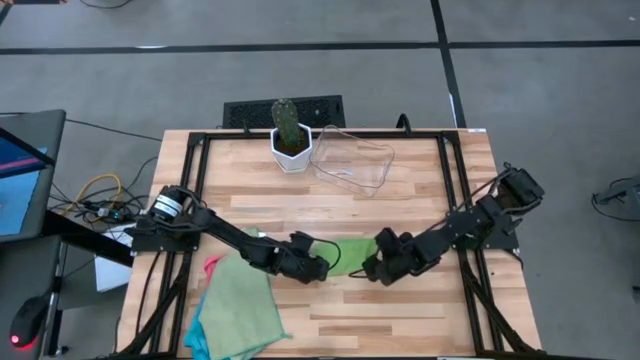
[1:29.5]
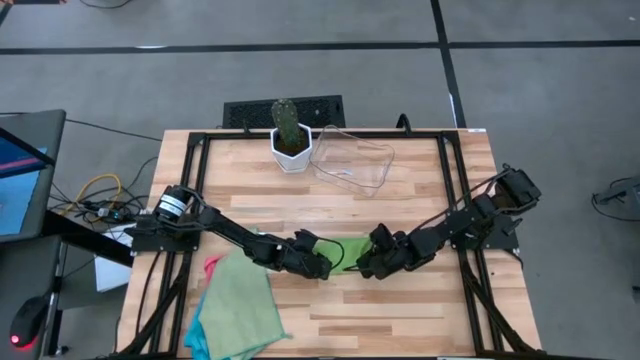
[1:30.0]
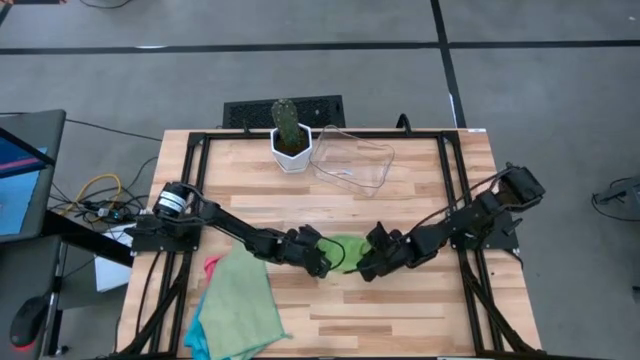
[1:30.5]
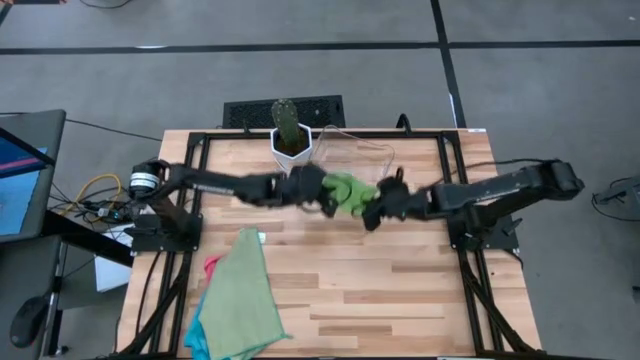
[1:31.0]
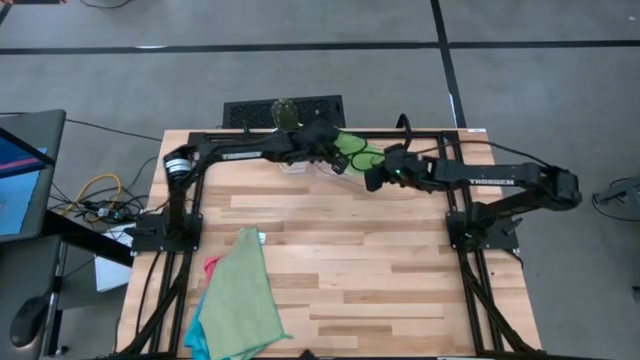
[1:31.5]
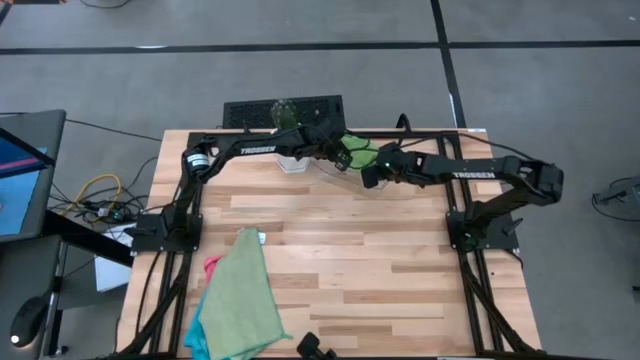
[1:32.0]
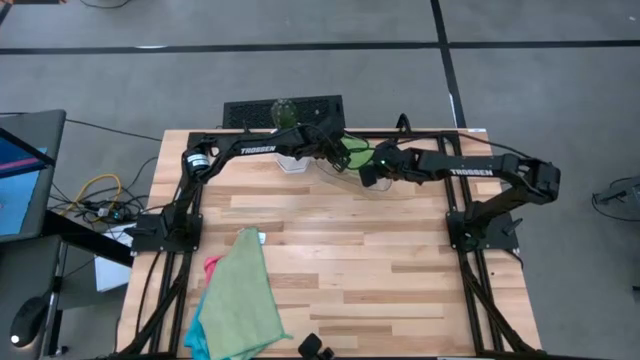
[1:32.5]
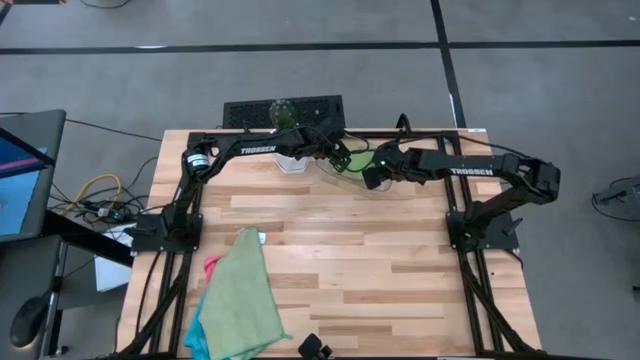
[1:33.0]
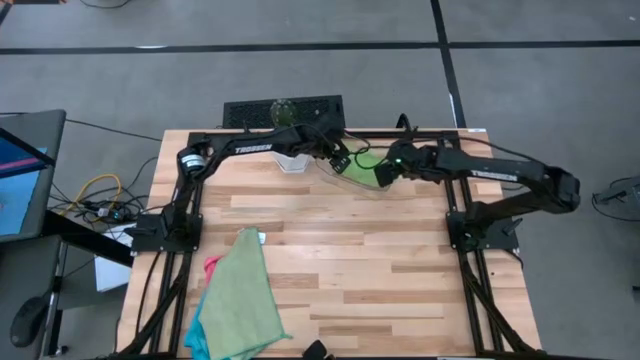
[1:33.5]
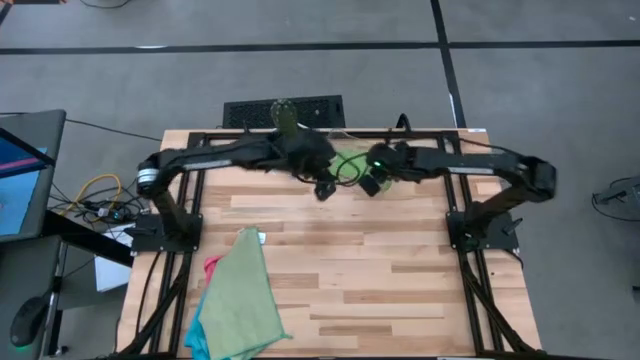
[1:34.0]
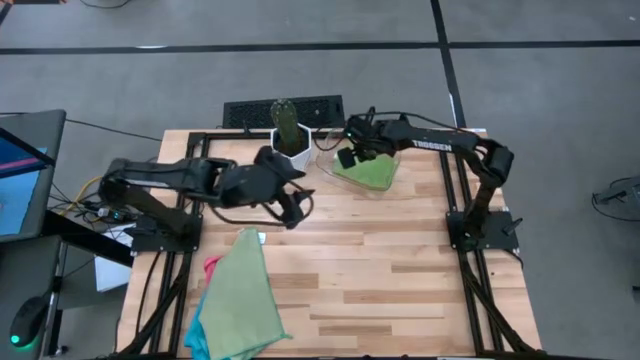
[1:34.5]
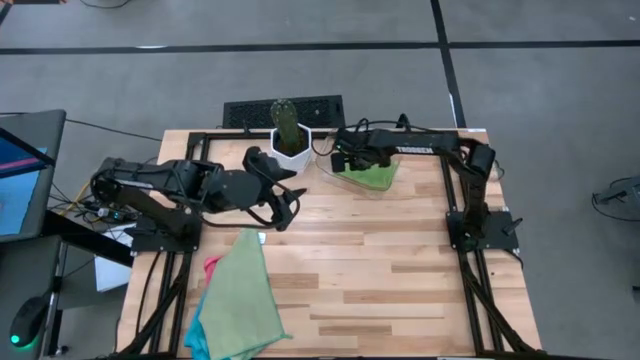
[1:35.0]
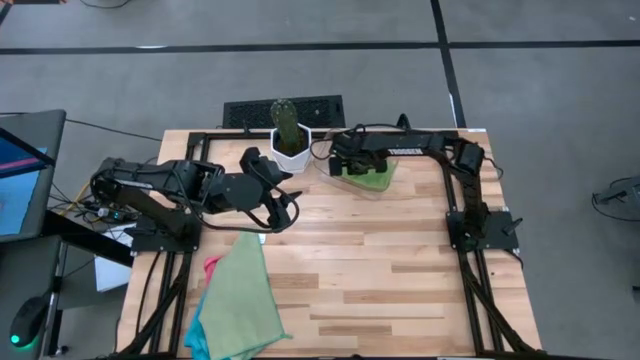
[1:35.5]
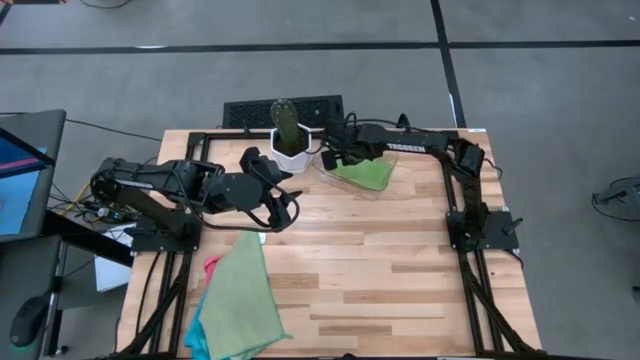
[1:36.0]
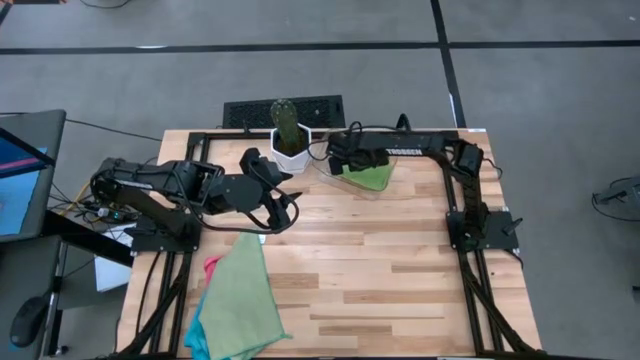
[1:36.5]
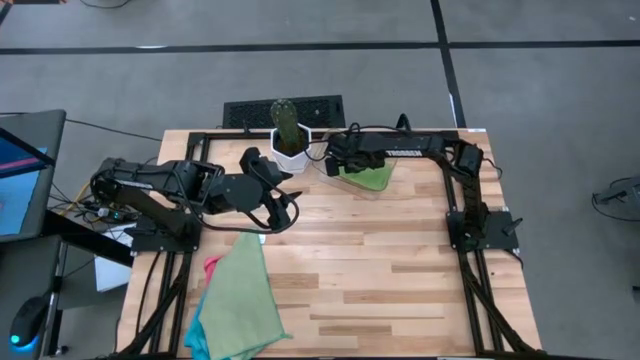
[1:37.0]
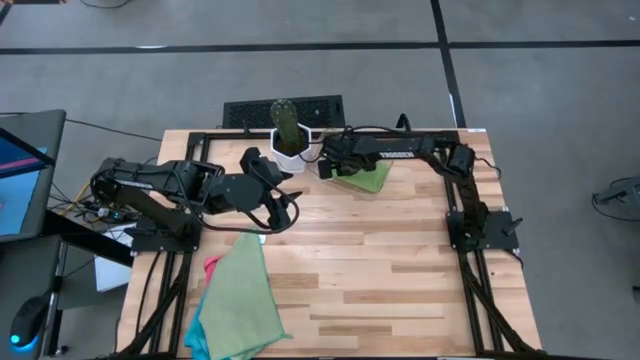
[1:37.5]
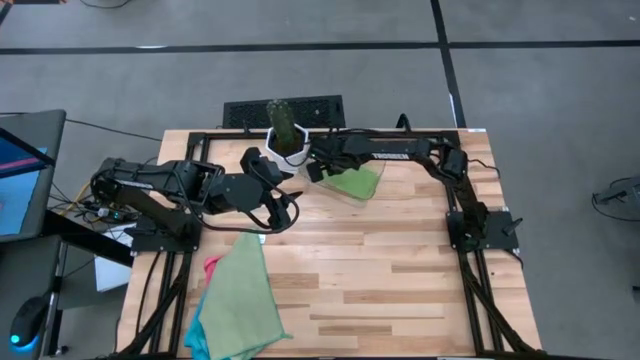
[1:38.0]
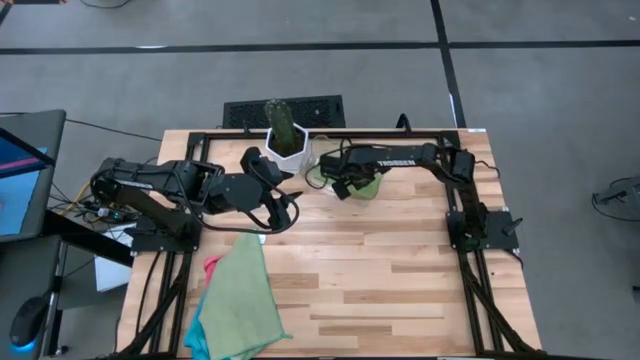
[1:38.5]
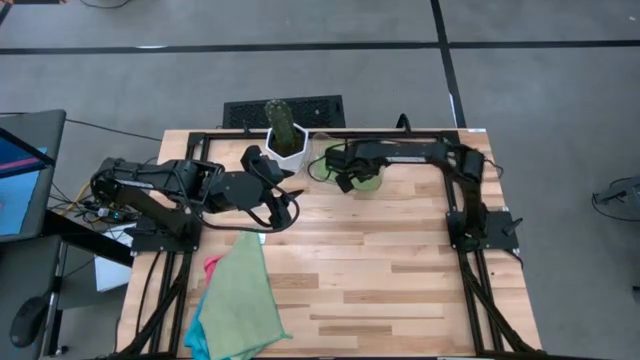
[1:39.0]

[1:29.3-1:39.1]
Task: Fold microfiber towels
Put the folded green towel into the transparent bin

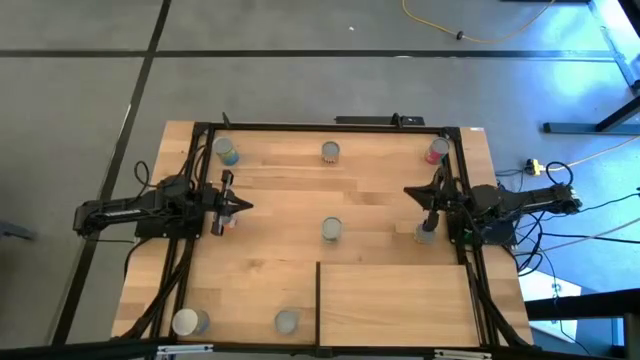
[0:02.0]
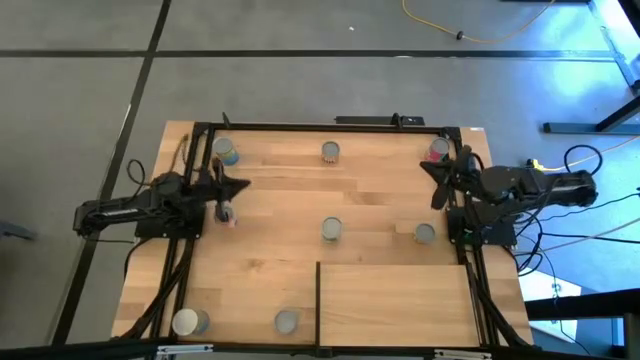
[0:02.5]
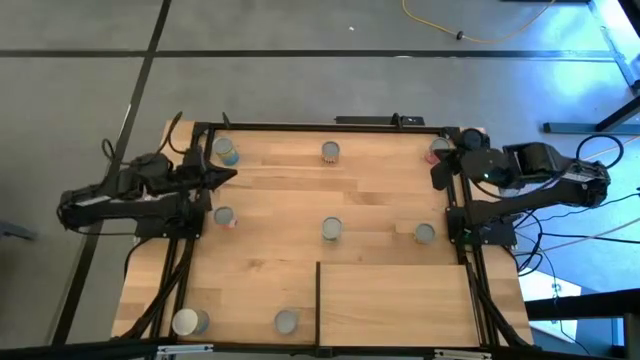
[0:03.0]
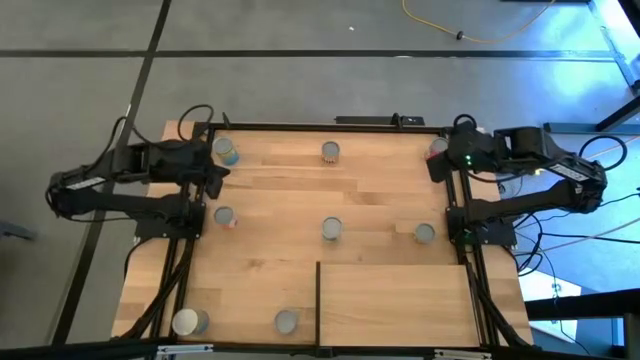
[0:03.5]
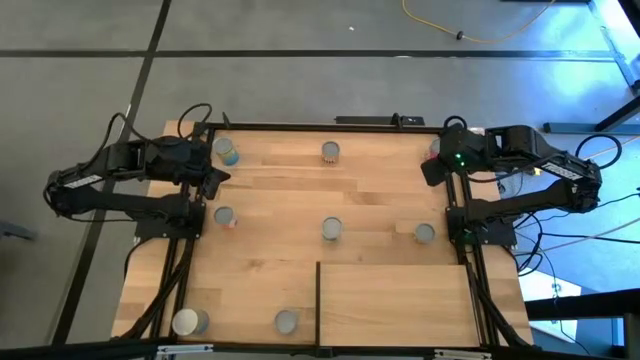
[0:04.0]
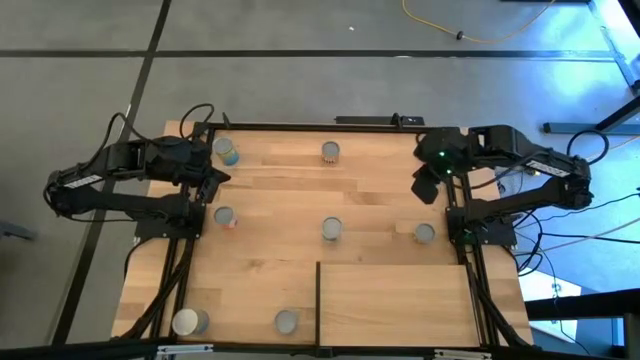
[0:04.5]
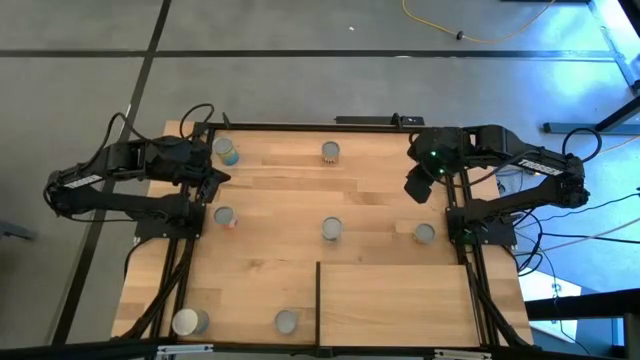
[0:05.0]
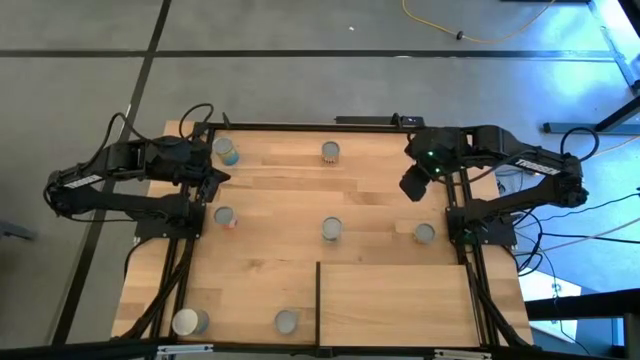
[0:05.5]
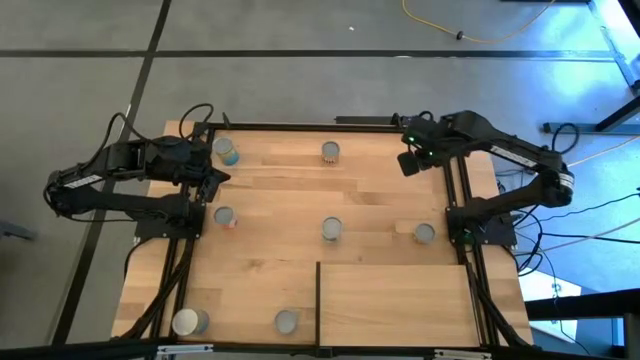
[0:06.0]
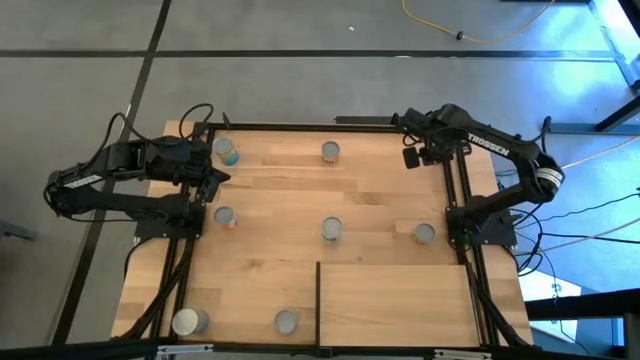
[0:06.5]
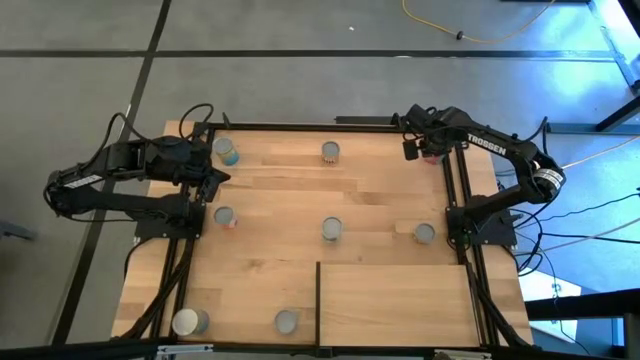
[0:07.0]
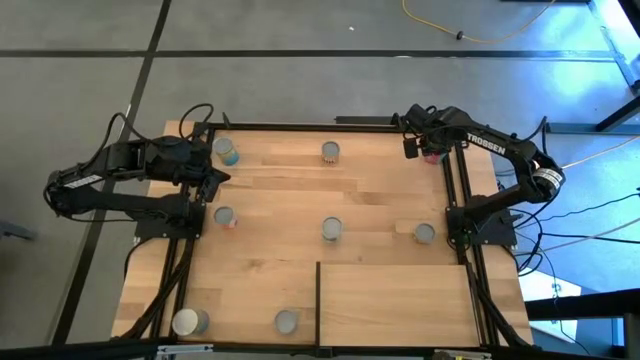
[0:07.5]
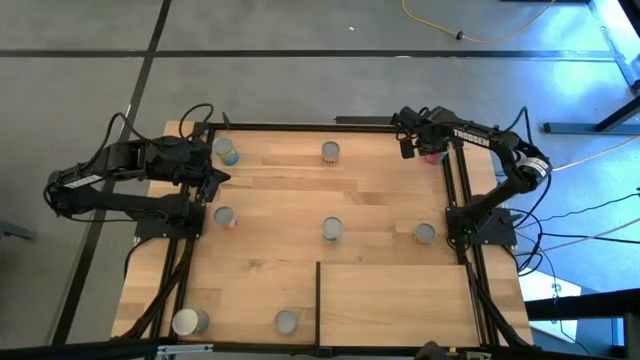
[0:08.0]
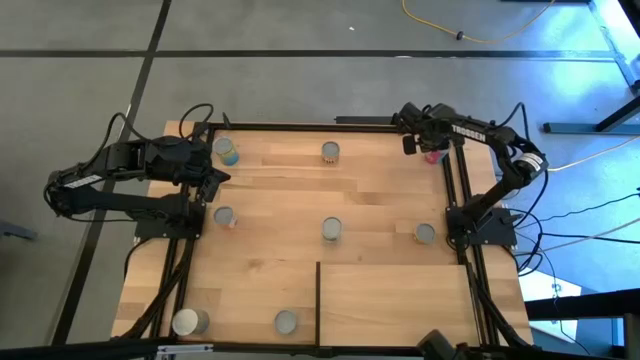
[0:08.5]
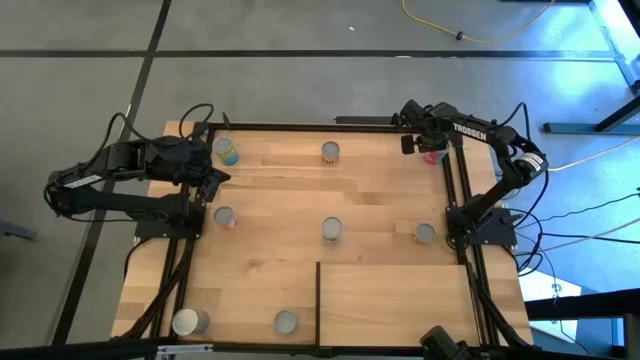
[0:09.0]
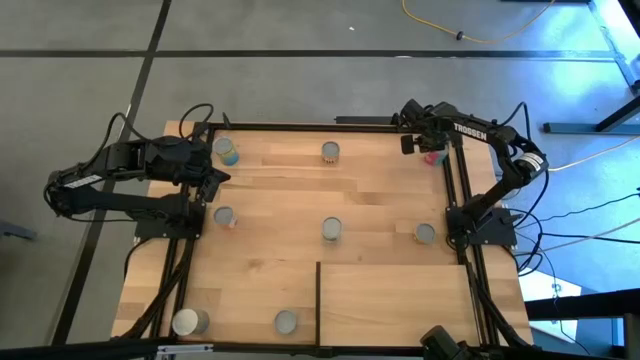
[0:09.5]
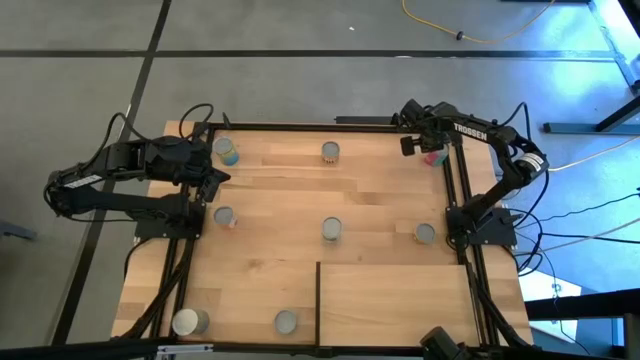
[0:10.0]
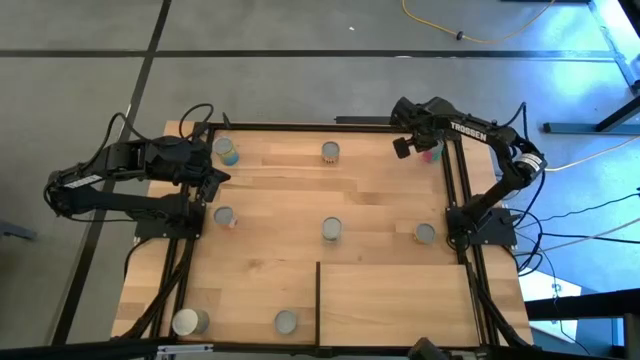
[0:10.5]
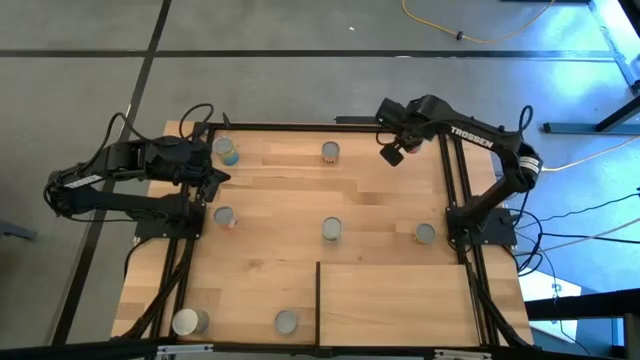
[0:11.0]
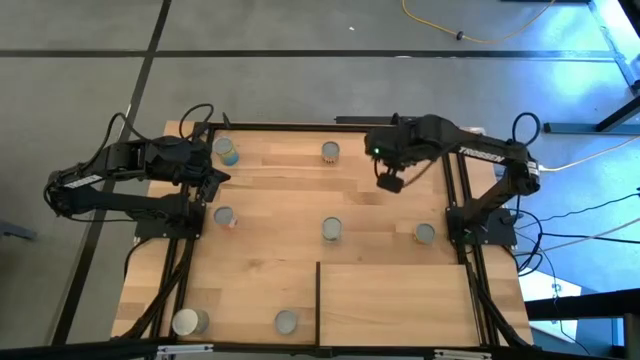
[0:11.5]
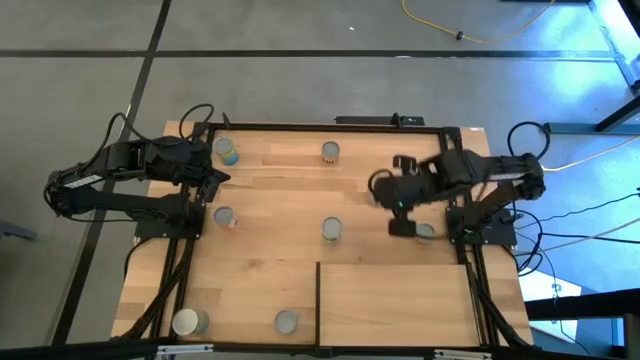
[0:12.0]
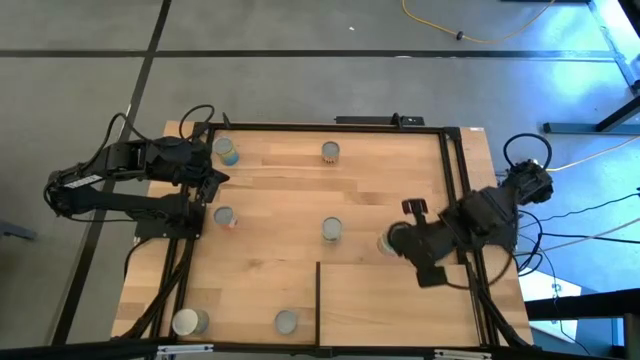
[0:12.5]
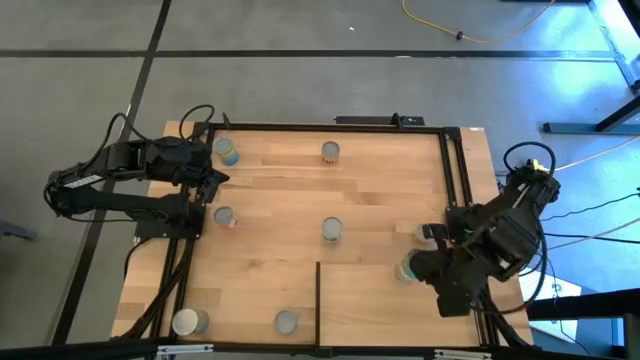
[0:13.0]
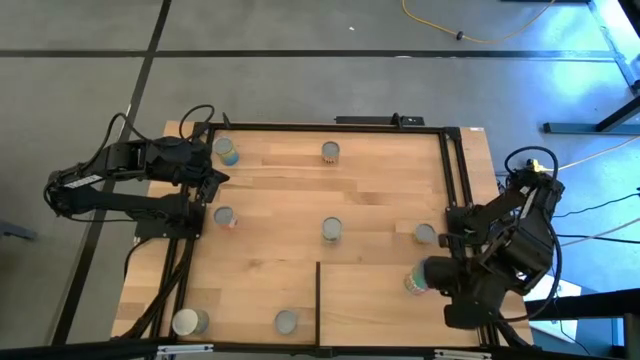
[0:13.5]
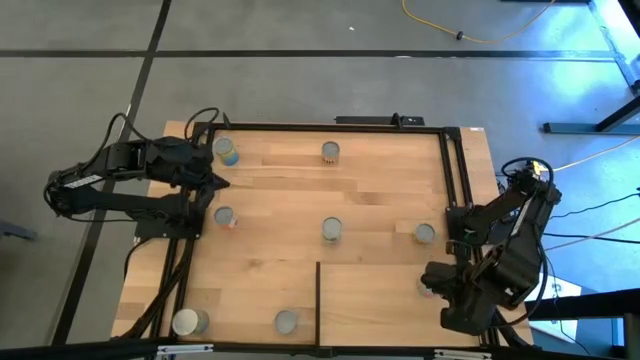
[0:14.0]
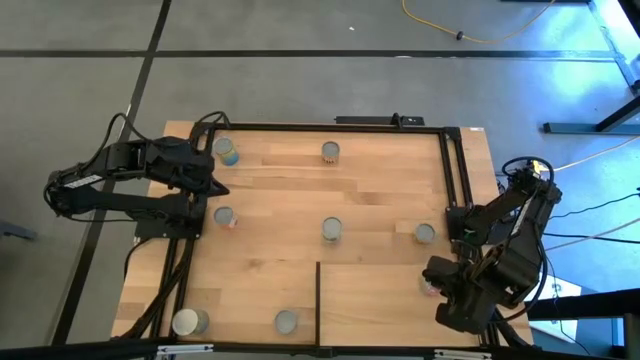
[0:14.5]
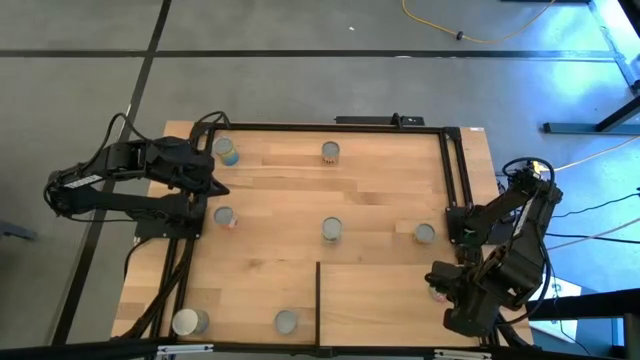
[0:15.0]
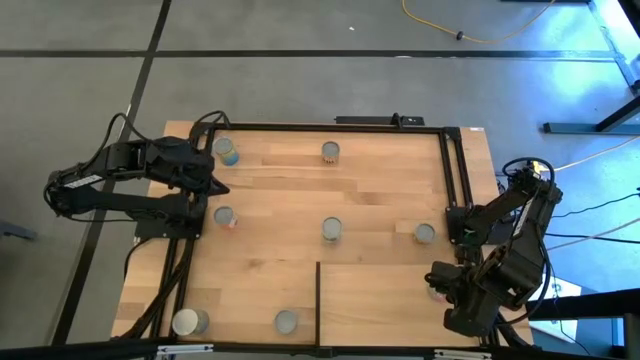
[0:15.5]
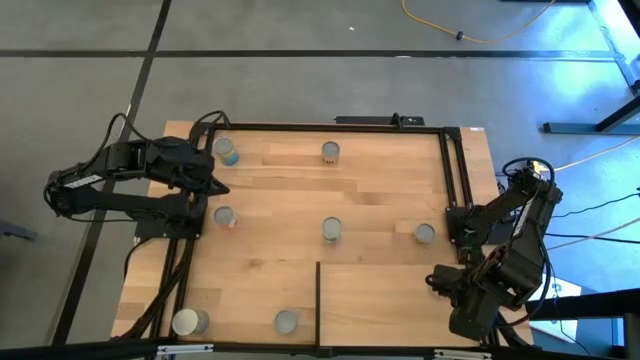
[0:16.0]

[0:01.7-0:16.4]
Task: Pick and place cans onto a shelf
Put the pink canned chicken soup on the shelf
